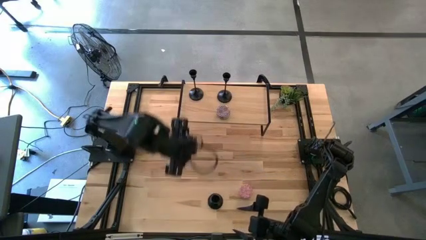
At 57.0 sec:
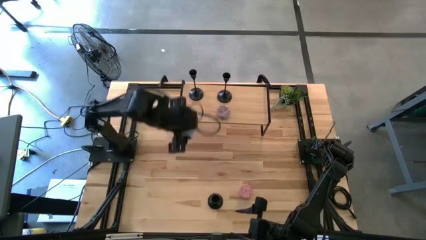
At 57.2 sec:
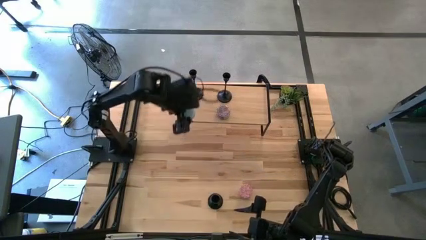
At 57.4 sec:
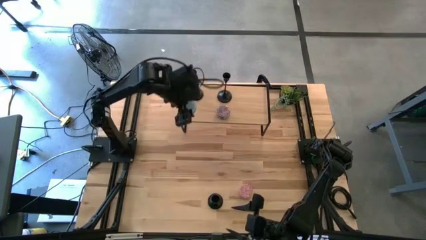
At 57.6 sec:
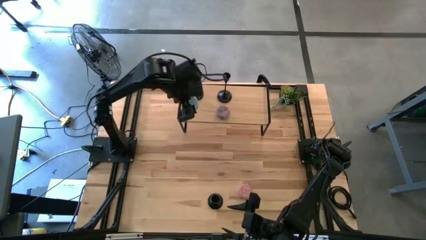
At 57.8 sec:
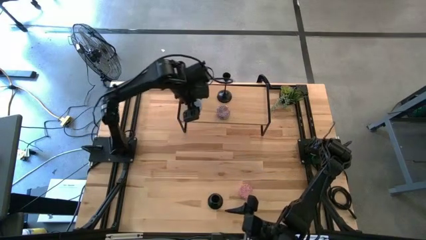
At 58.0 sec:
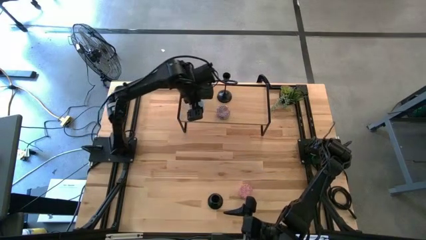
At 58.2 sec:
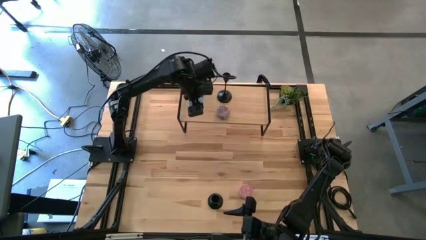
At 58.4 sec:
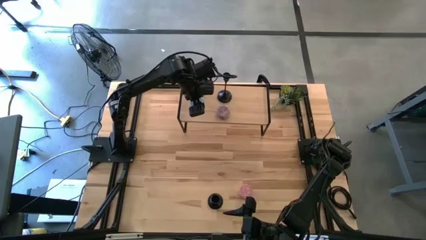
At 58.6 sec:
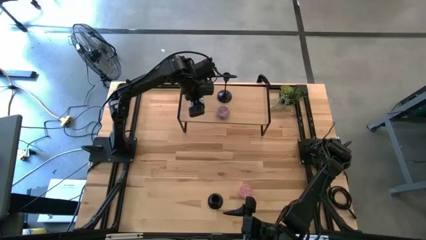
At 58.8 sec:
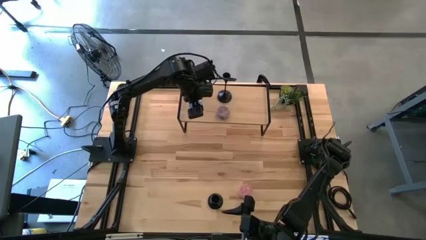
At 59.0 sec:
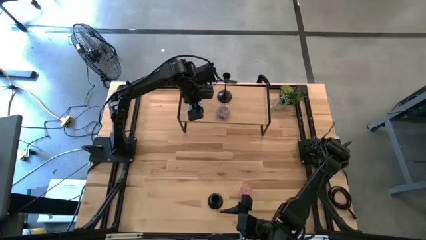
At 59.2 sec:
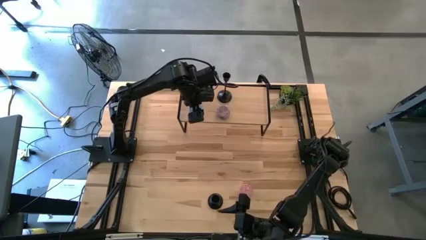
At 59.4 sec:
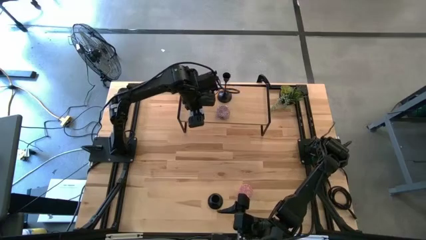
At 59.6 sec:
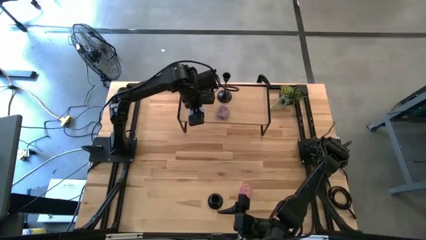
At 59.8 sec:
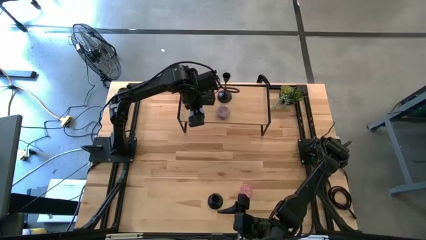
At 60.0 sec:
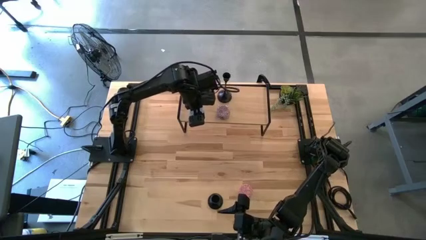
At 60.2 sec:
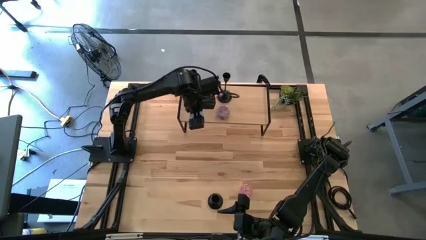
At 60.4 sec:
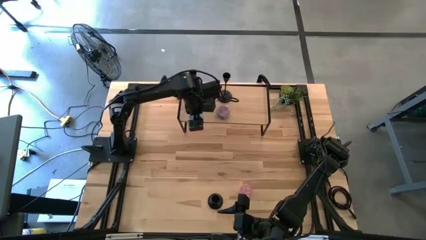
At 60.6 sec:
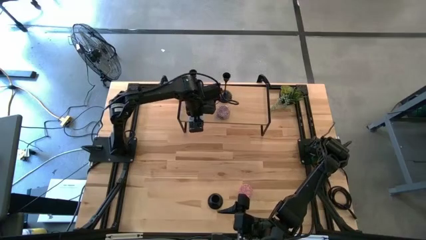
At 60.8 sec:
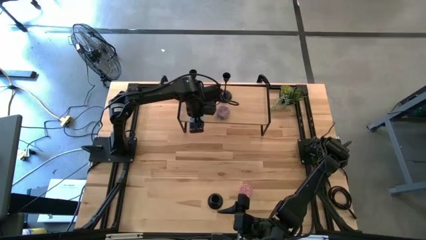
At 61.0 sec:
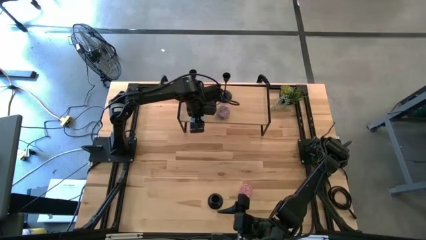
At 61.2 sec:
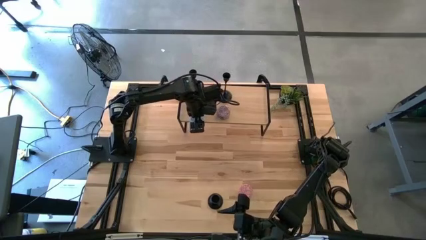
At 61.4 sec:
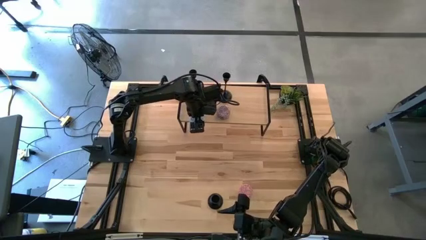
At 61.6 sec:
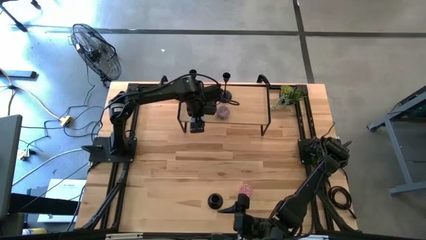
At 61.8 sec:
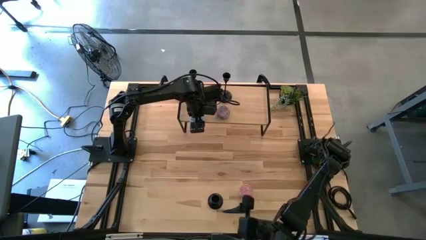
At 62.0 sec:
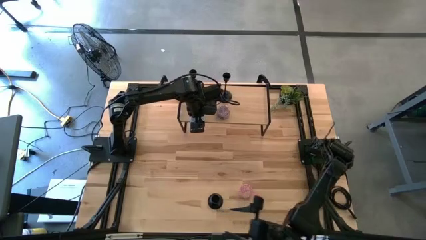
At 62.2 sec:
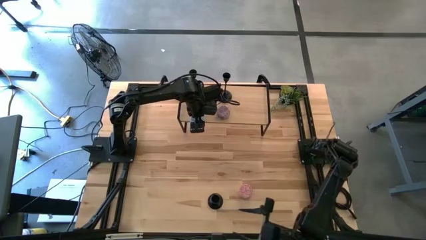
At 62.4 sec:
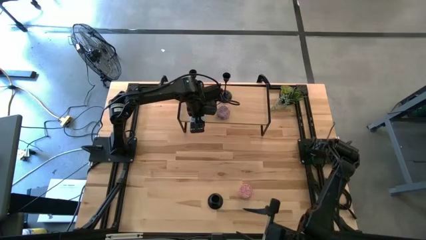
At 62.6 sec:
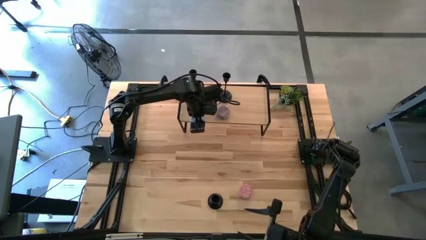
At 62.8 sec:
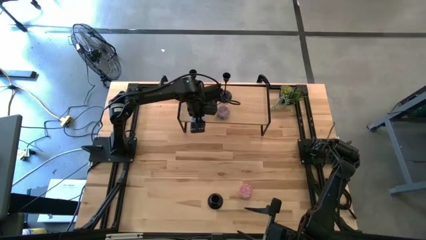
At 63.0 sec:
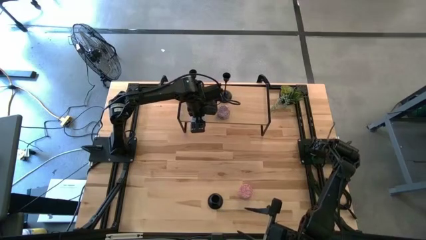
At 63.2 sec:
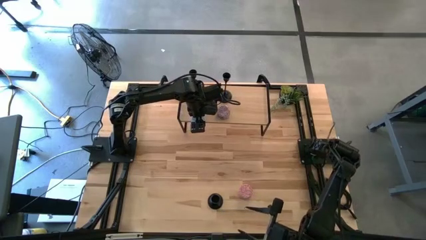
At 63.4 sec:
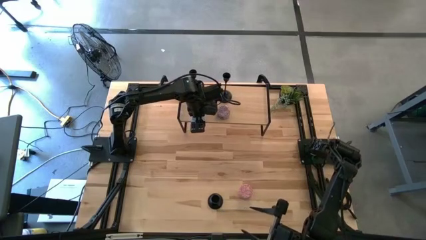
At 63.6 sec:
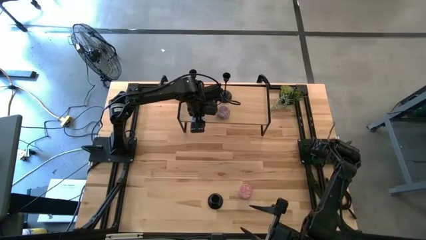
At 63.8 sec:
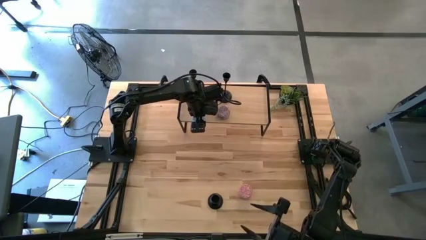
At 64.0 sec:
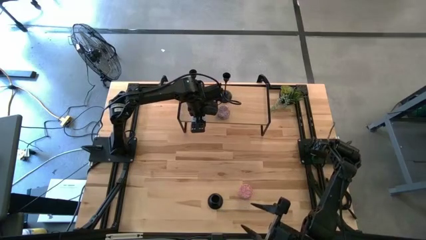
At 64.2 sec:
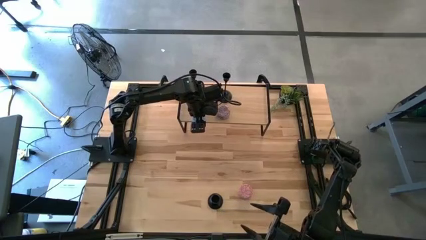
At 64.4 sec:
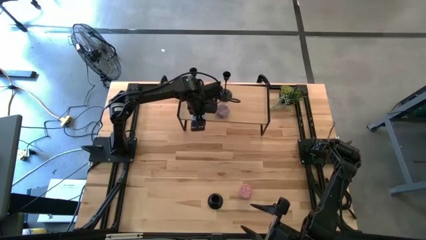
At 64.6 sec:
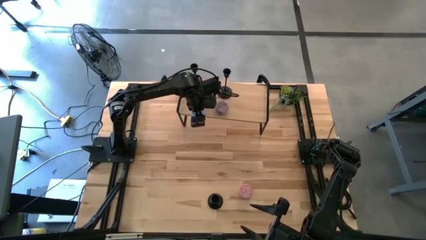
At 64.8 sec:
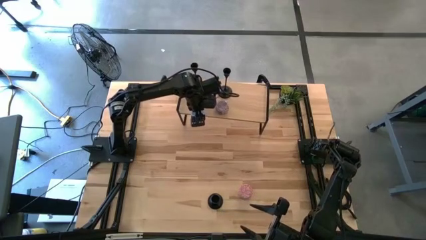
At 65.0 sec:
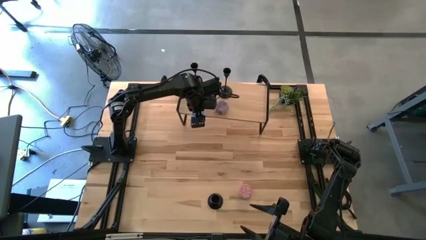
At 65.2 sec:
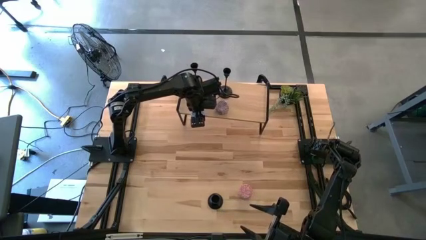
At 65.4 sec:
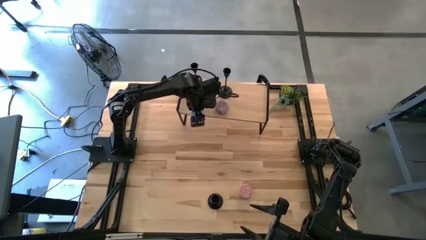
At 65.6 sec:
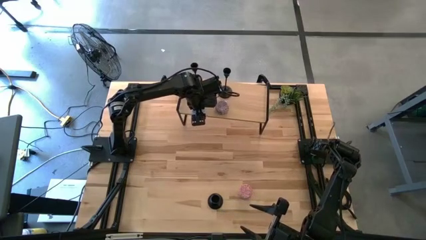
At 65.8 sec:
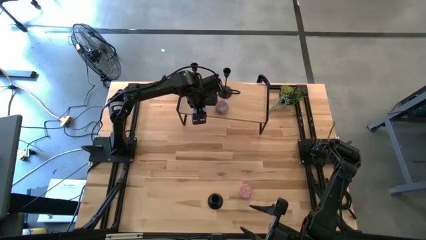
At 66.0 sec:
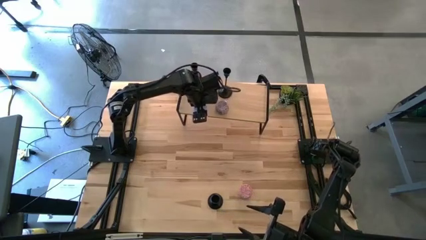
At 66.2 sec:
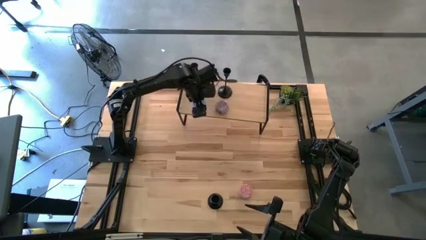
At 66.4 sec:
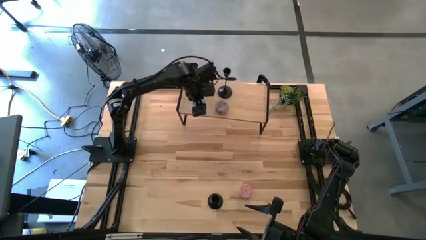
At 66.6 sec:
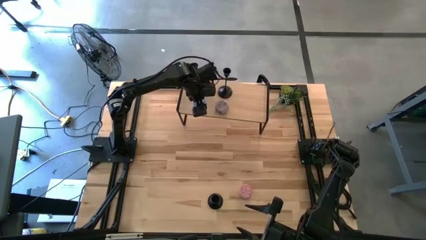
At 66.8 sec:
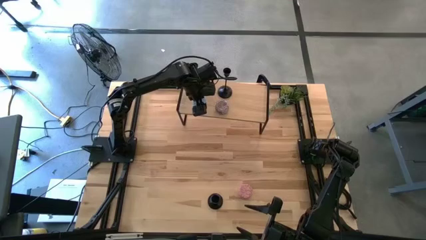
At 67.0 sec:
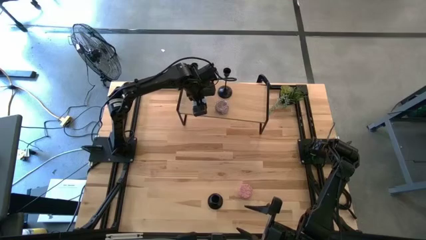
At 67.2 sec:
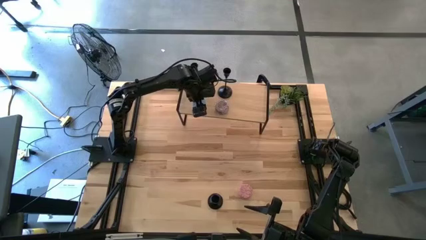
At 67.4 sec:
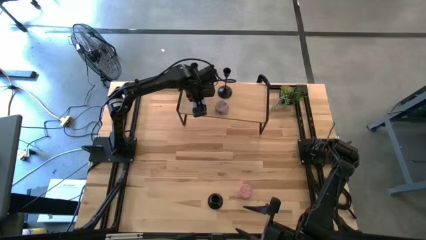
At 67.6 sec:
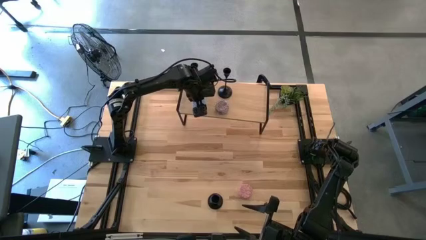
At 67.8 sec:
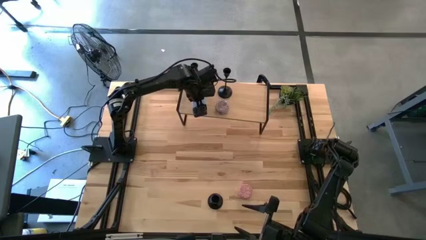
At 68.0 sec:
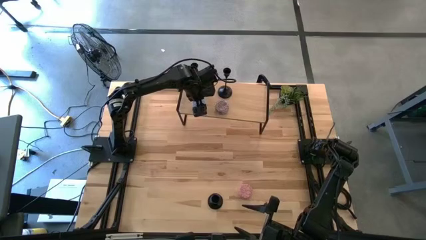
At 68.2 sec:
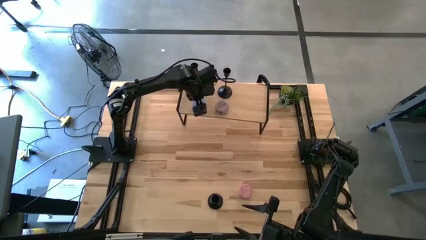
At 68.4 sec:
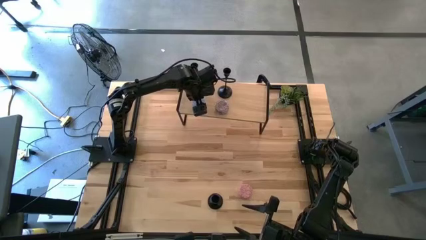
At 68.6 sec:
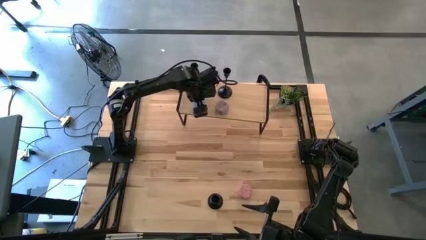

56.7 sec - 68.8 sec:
Task: Pick & Place candle stick holders
Put the blue scented candle on the shelf
